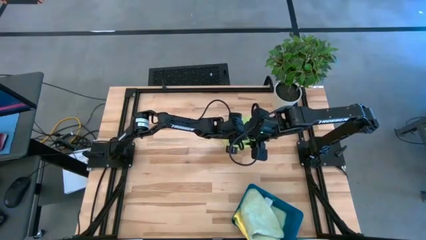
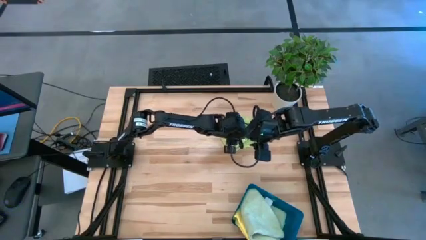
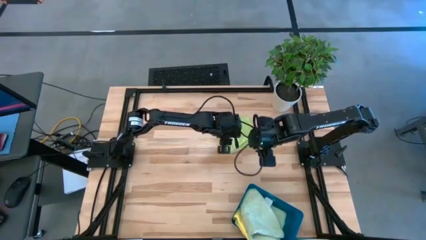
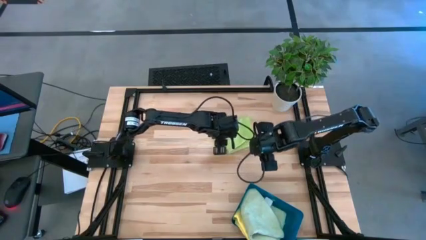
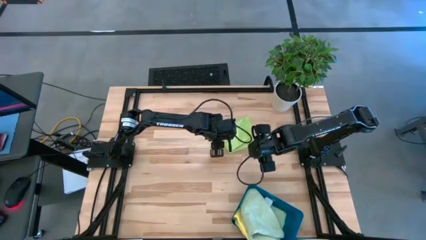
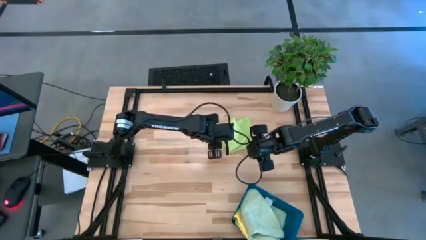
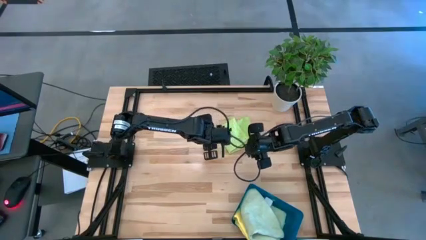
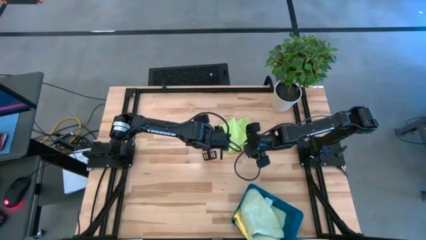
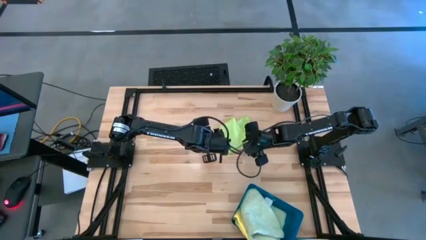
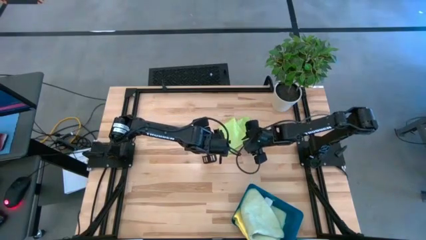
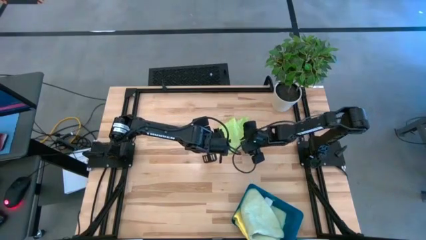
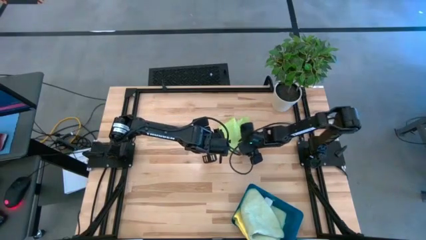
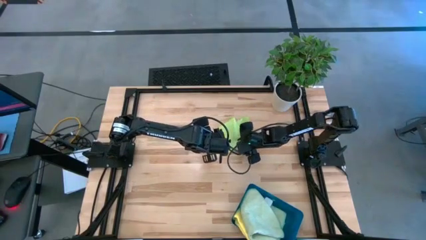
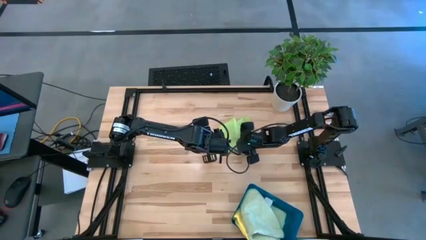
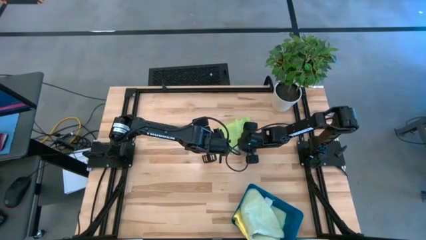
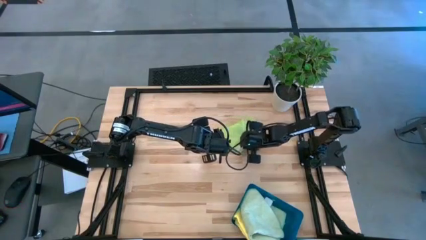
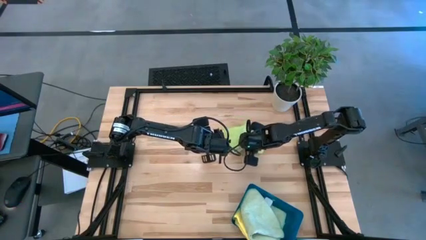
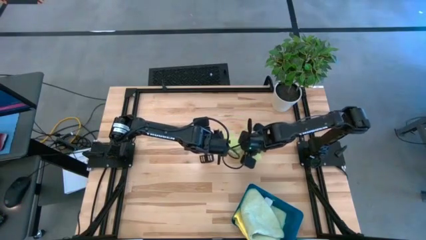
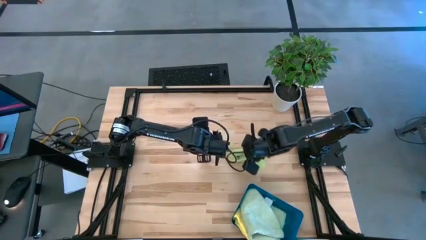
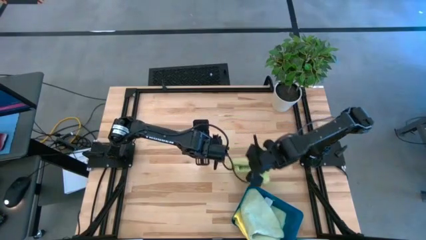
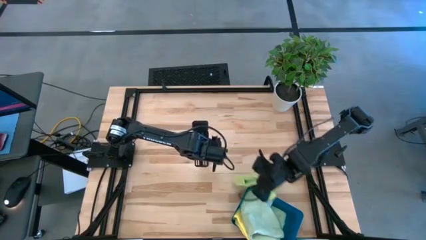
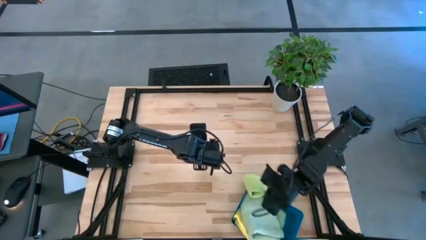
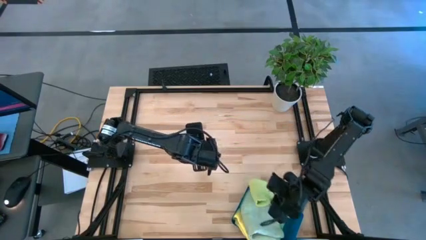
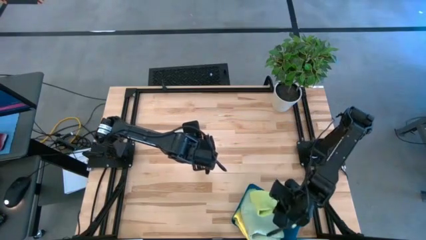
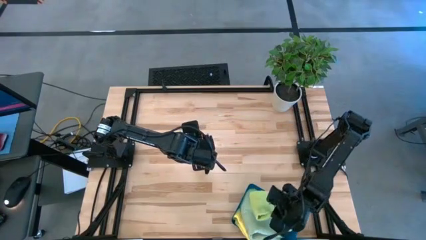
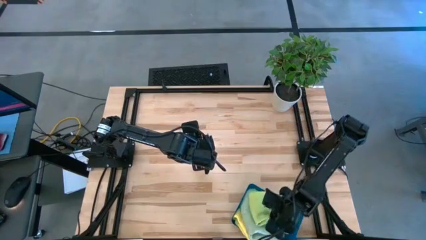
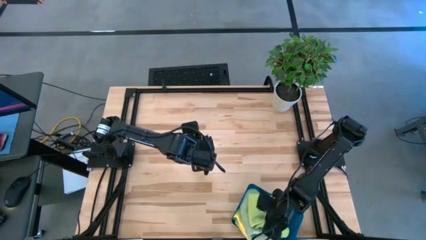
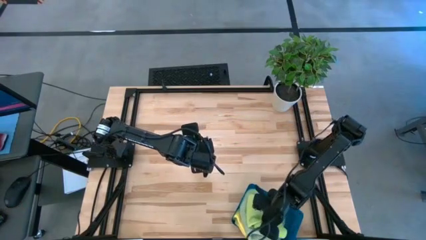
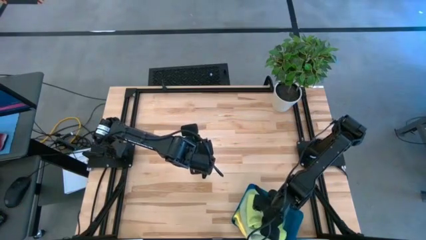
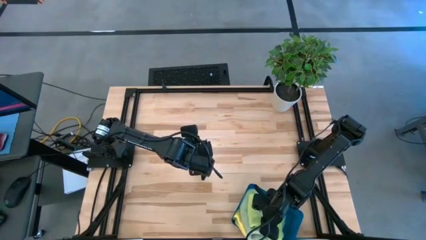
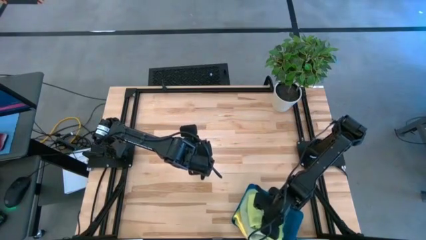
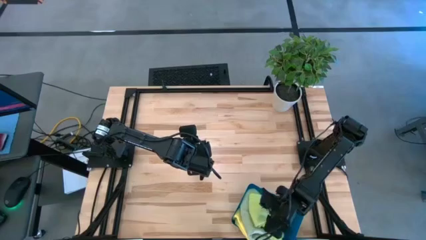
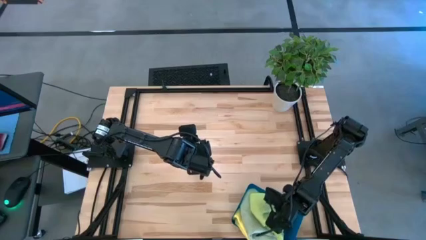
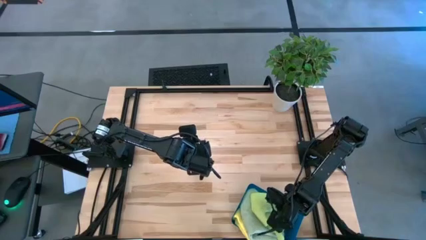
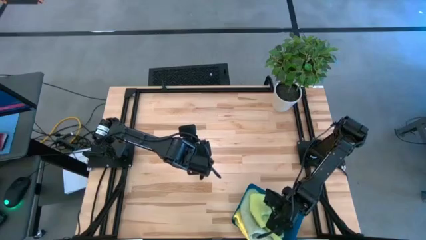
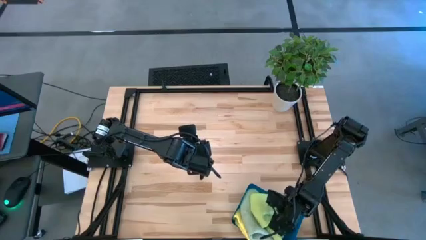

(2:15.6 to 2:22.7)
Task: Fold microfiber towels
Put the green towel in the bin

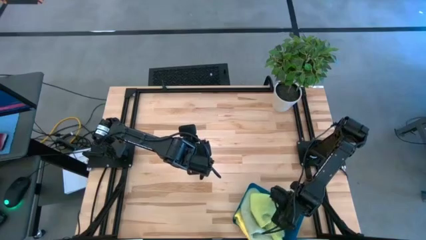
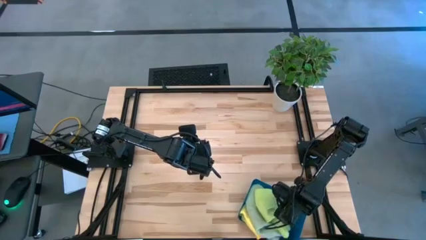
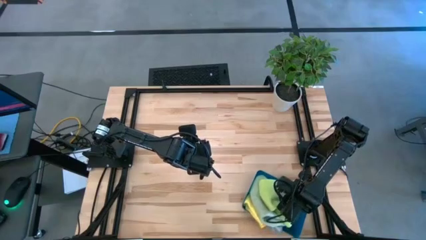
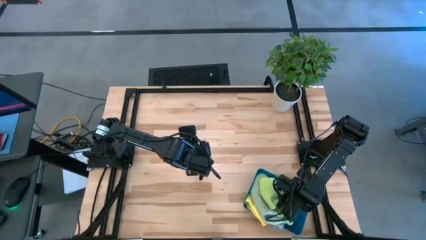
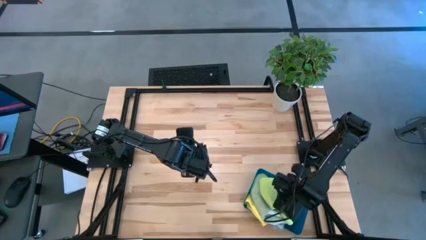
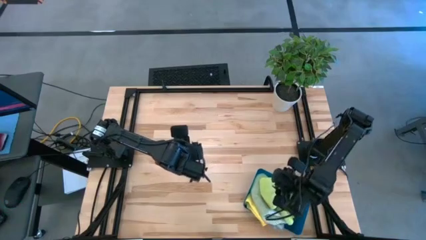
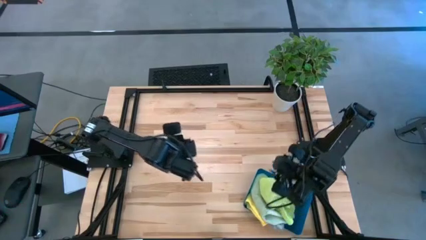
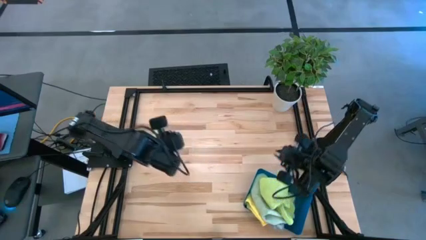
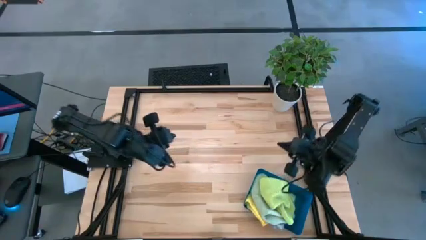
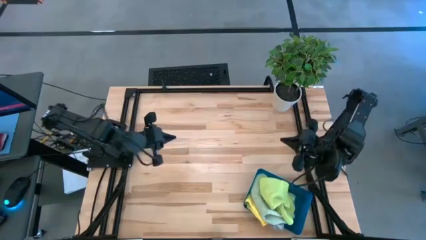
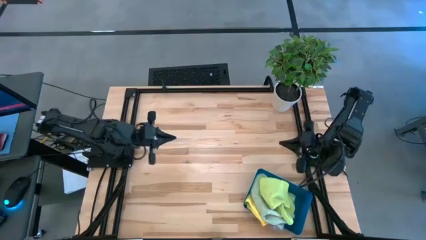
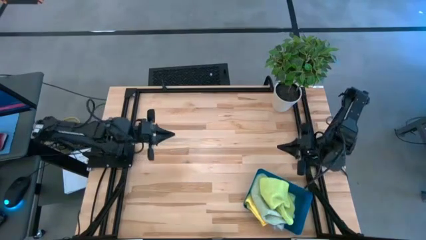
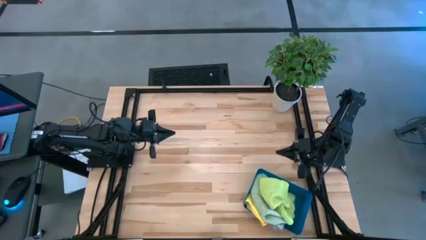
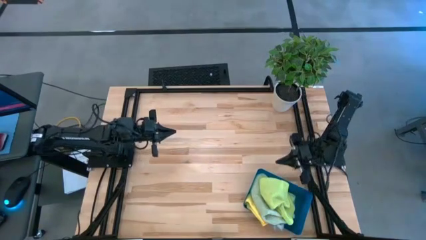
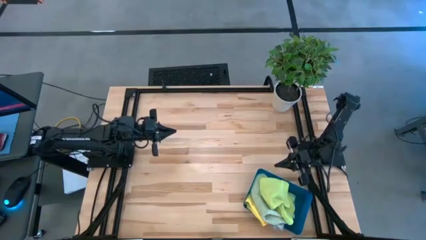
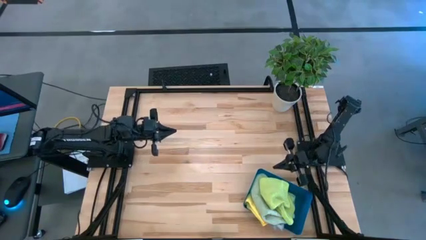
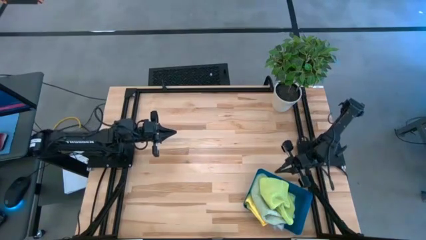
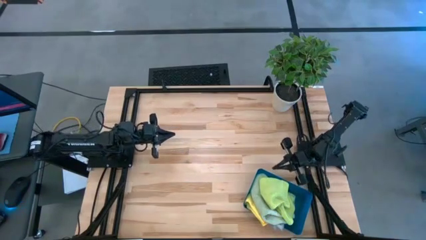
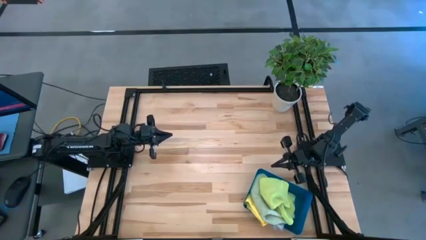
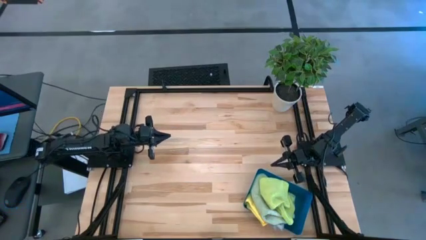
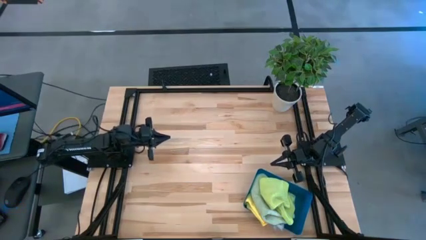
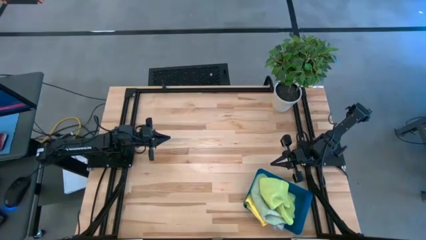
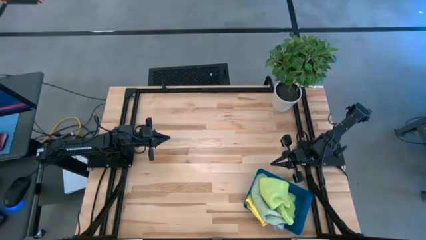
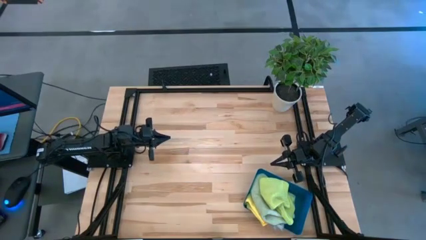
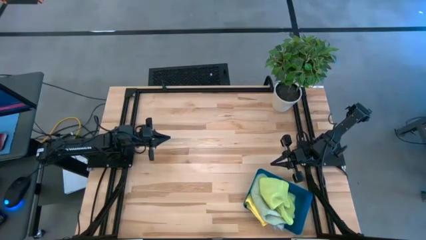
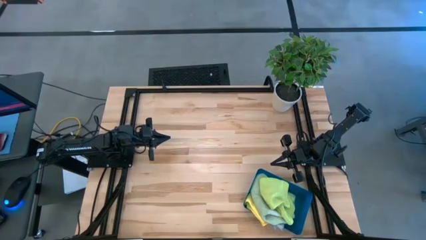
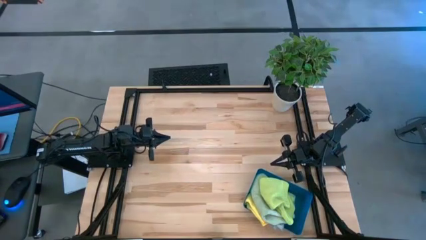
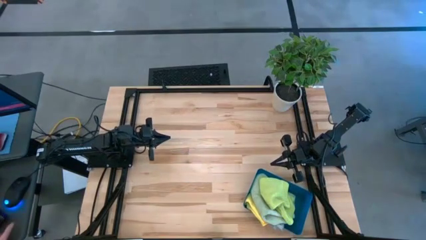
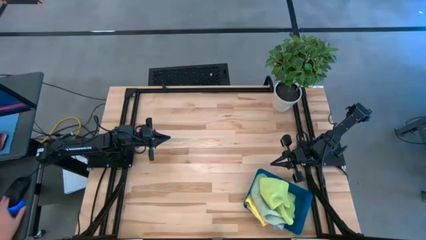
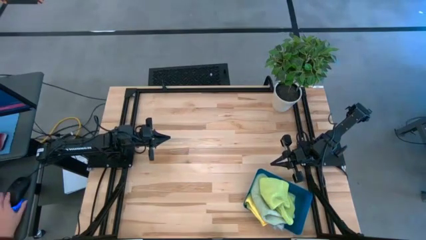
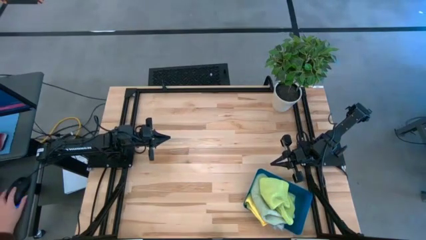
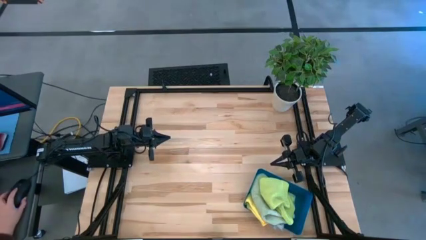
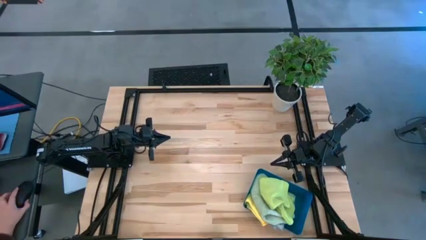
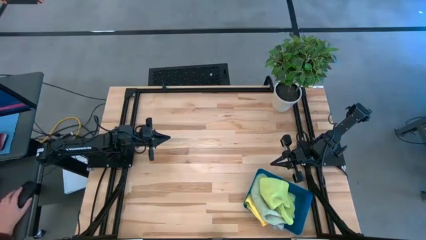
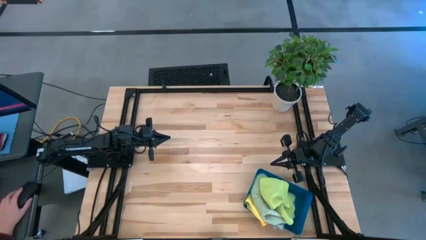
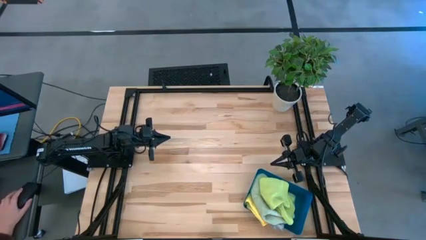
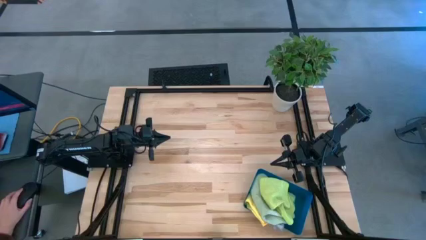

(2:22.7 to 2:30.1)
Return to Home Position

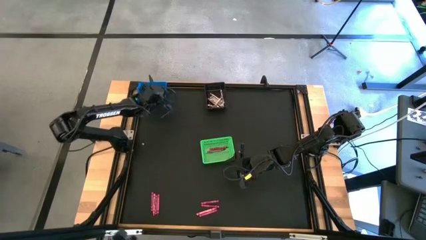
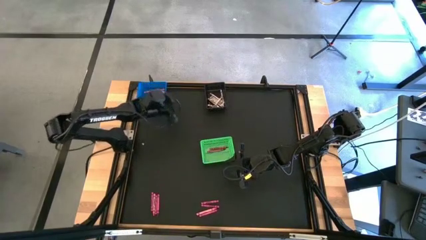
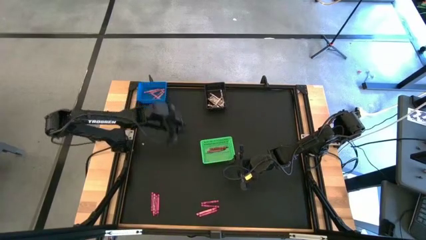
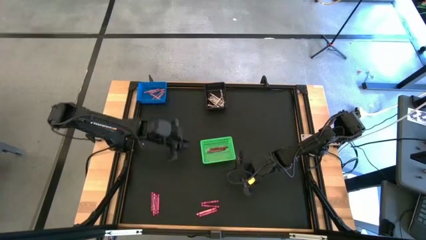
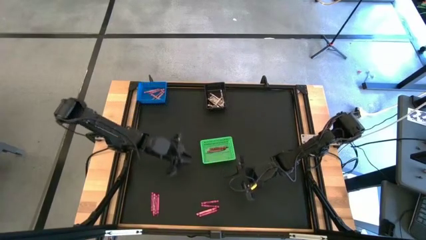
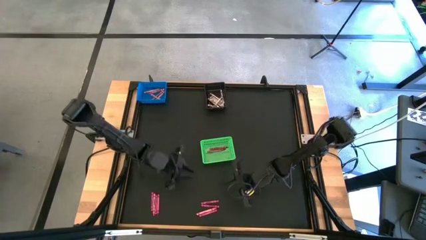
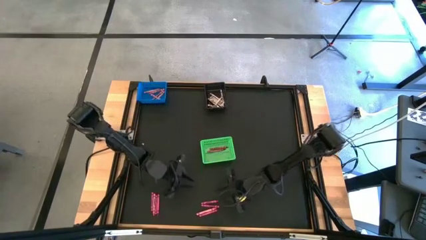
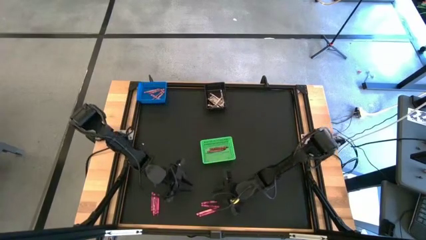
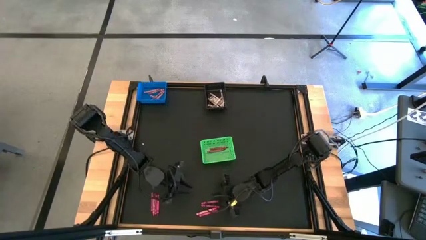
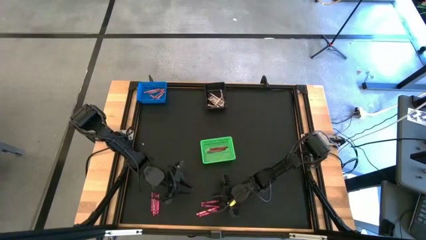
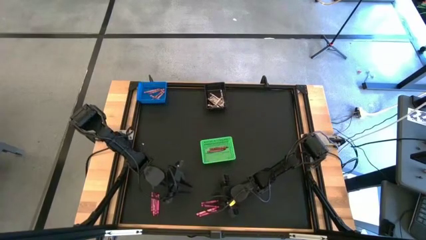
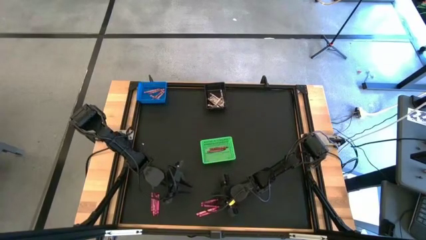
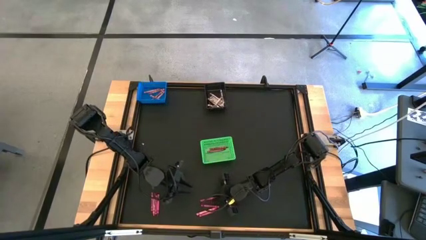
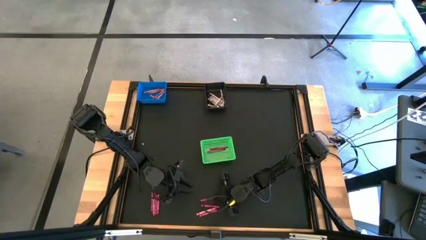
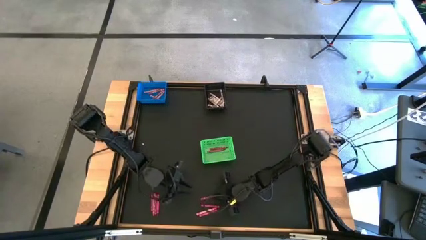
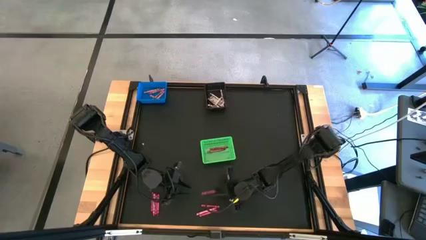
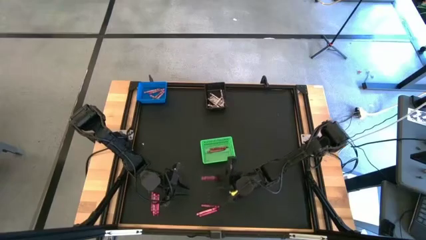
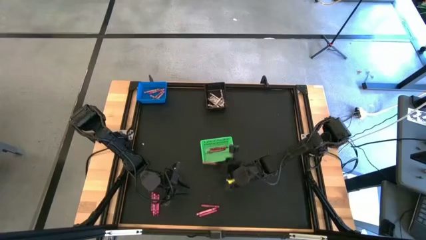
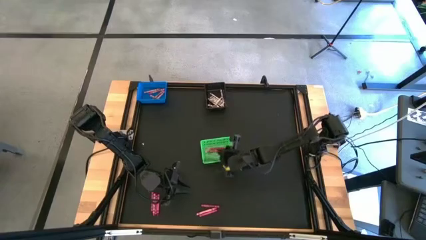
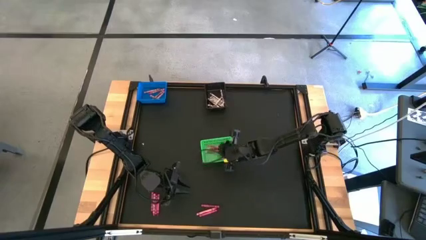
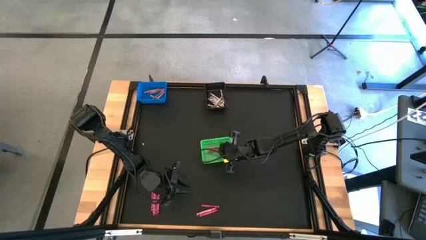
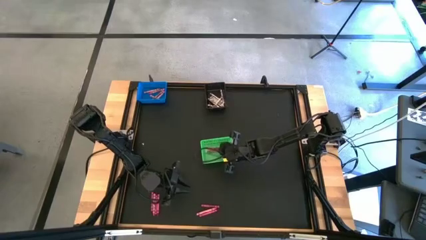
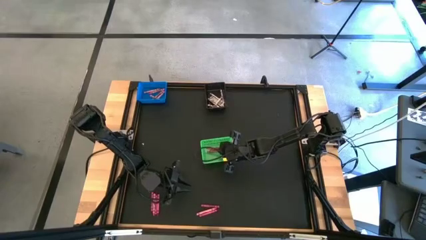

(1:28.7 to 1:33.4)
Task: Sort crayons
Put the red crayon into the green bin
